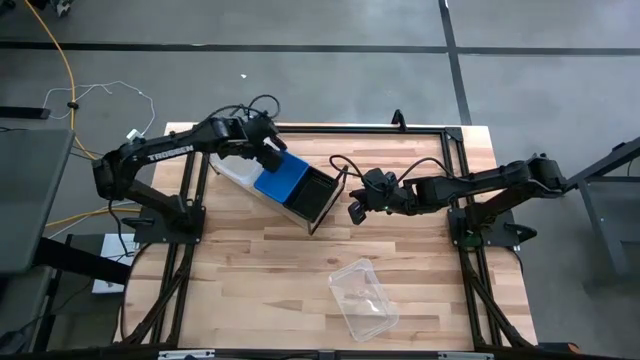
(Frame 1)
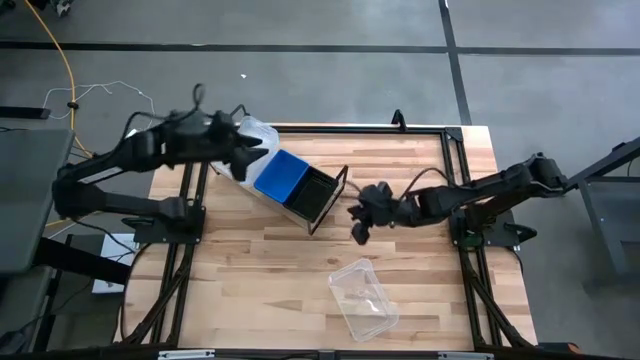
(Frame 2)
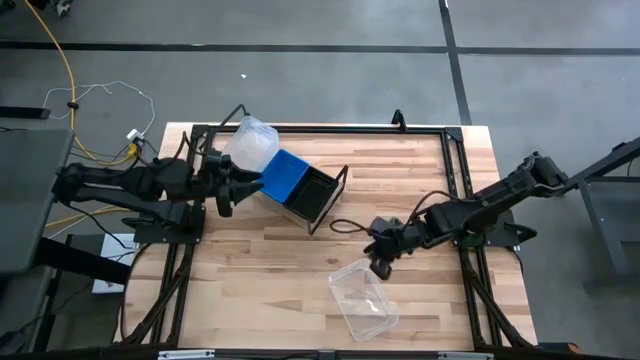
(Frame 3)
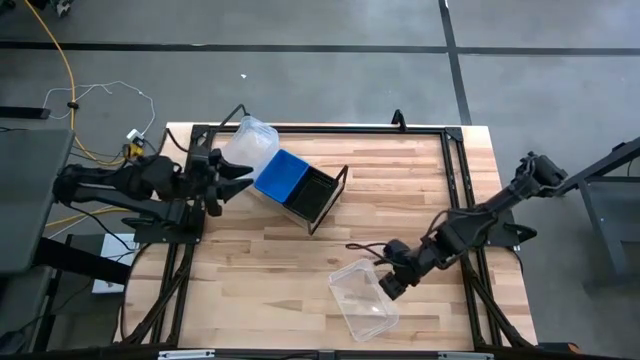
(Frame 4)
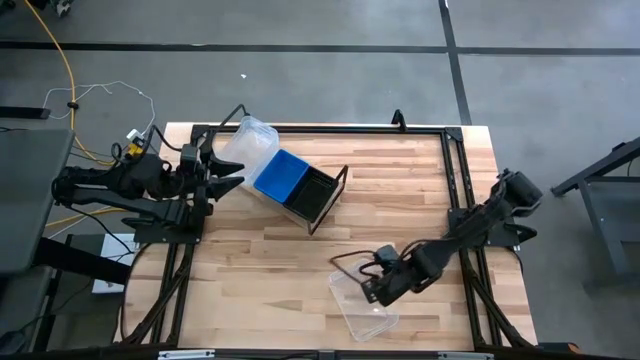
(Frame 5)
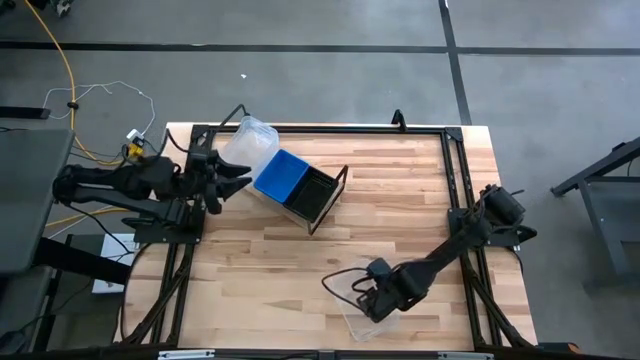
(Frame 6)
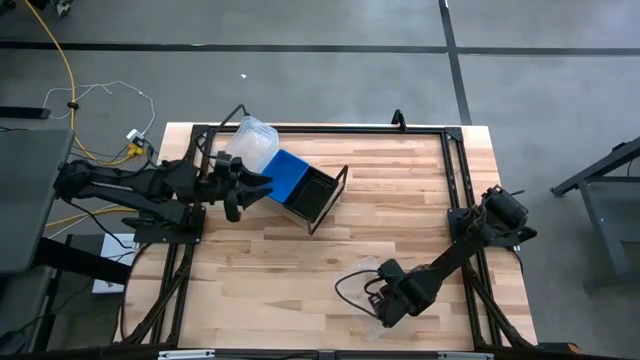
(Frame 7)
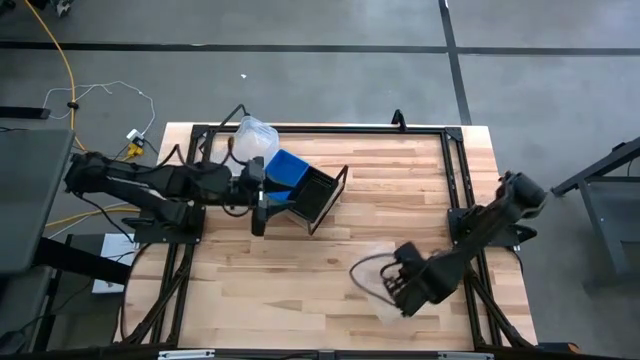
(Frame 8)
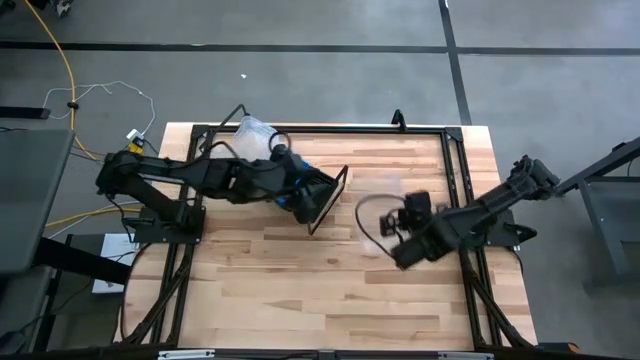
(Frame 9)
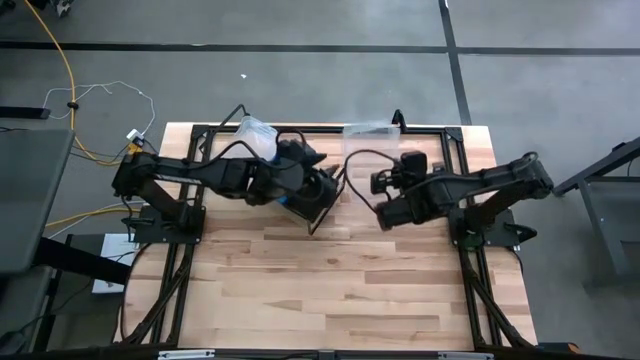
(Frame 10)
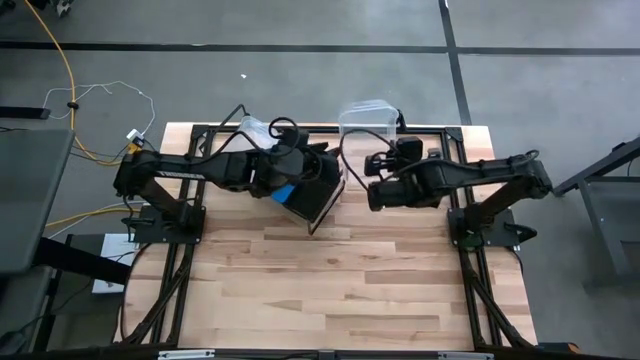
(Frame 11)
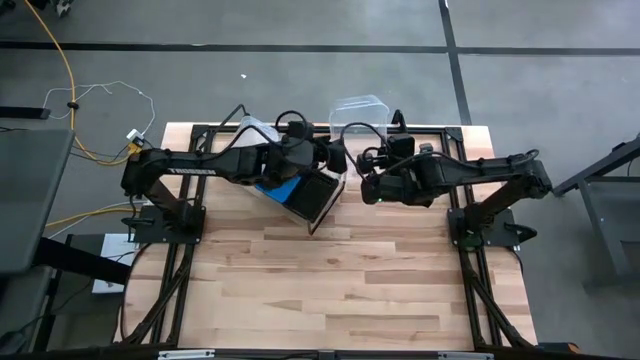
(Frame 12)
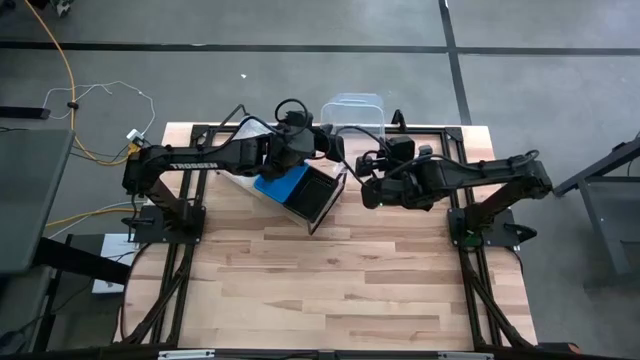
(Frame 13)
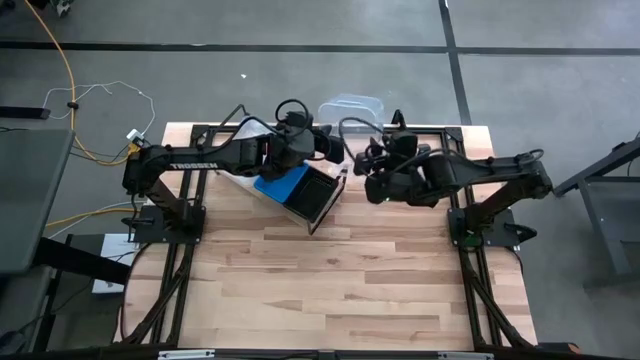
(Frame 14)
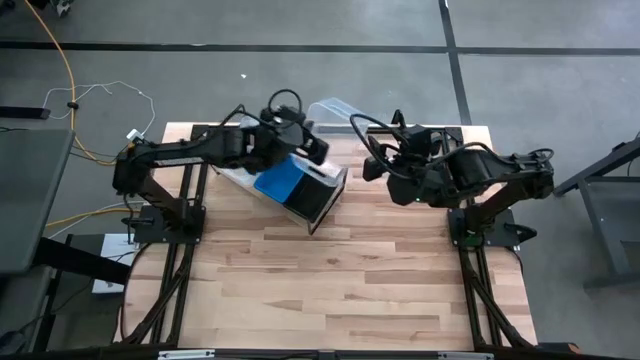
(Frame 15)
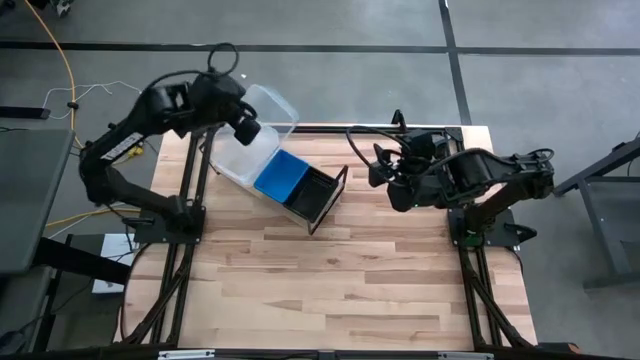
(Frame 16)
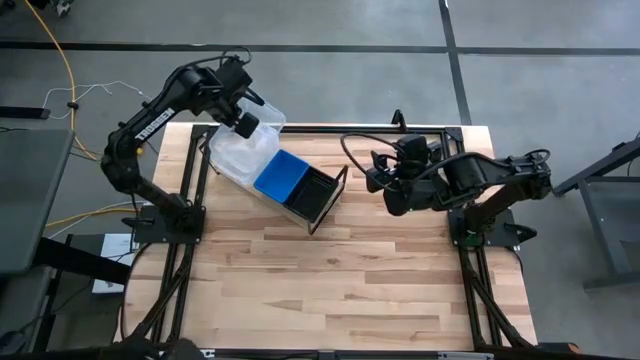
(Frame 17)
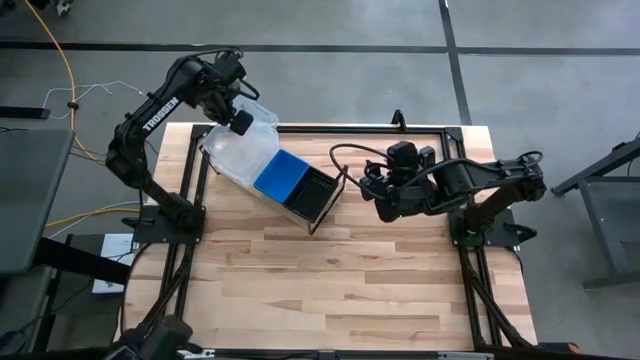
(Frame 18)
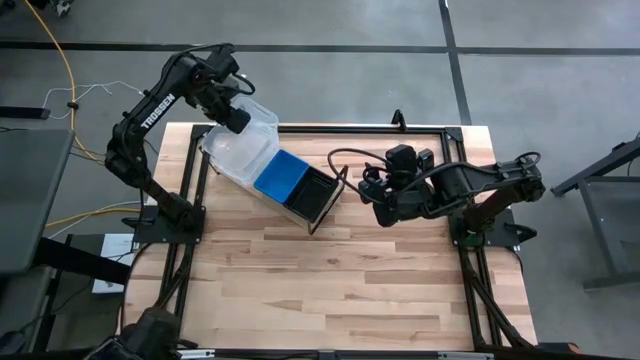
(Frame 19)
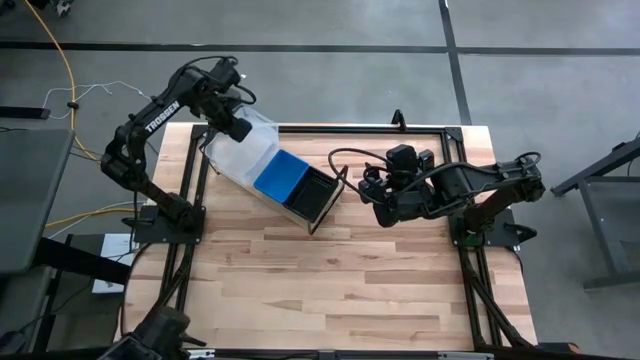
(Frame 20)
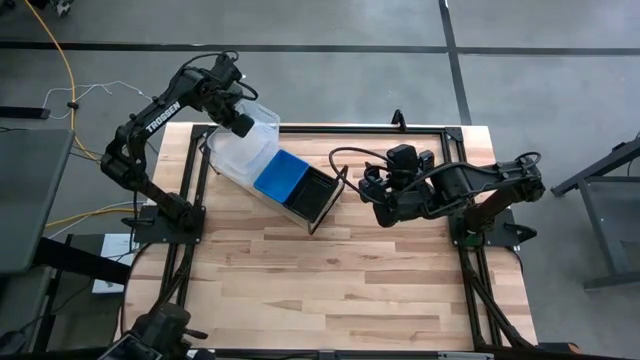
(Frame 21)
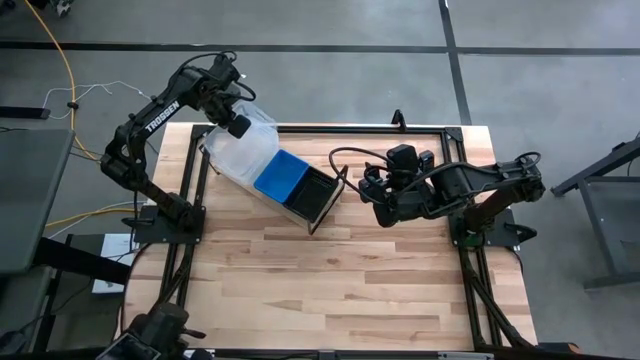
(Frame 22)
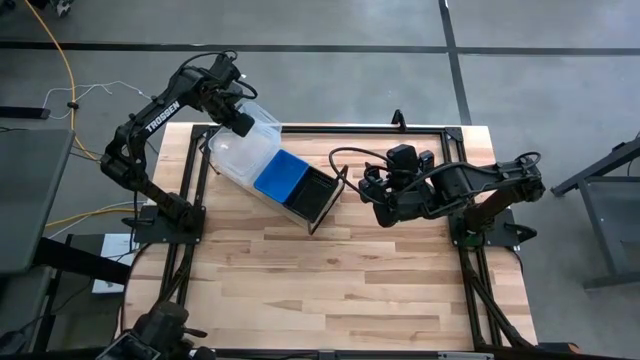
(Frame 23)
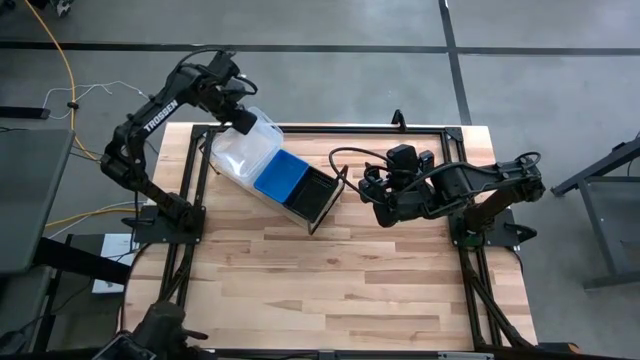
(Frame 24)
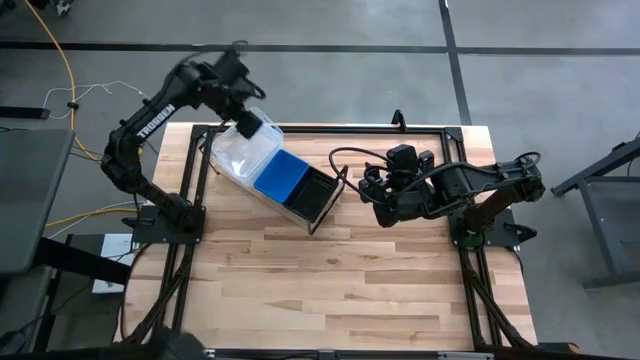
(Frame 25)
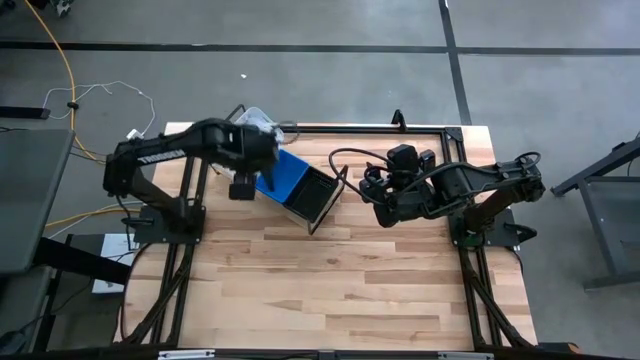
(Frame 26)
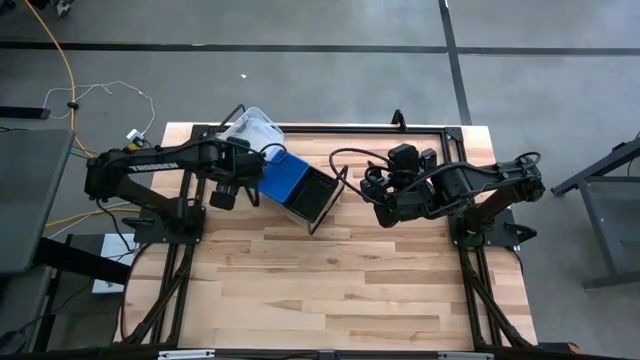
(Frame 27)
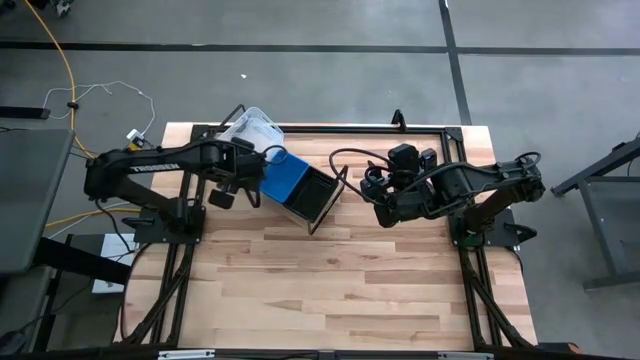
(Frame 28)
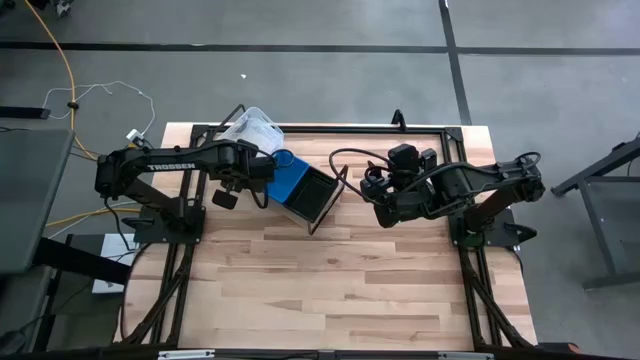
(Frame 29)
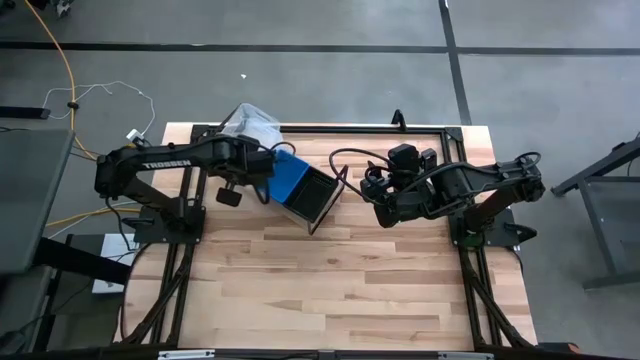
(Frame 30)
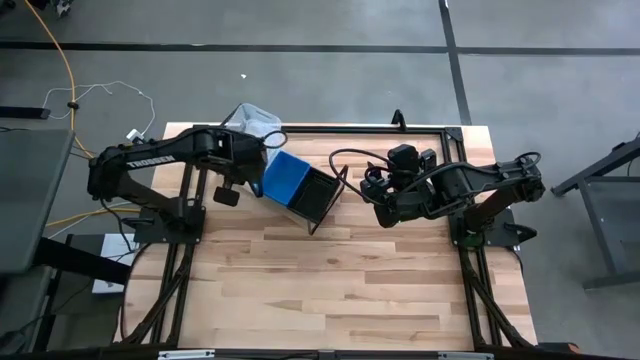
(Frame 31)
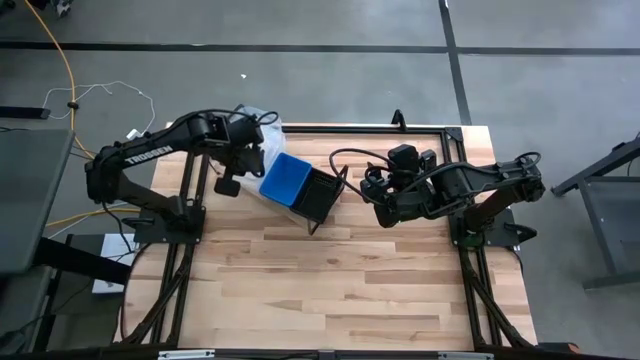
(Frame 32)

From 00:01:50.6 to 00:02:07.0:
Task: Stack baskets on shelf by color
Stack the transparent bin on top of the other transparent bins on the shelf

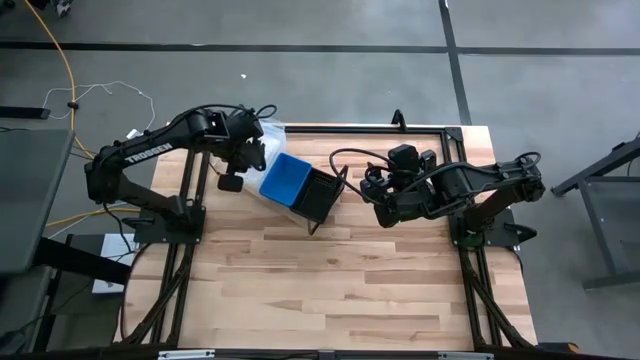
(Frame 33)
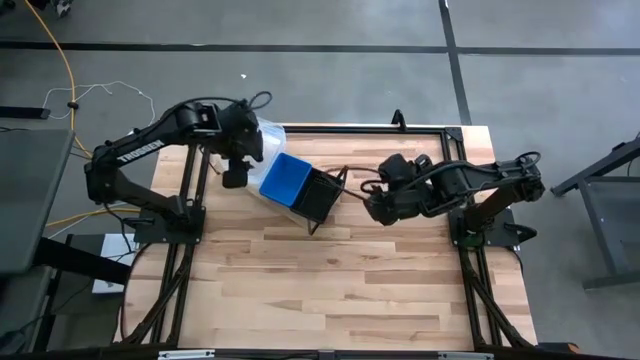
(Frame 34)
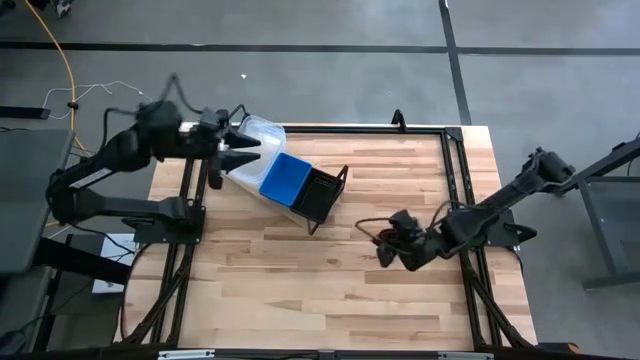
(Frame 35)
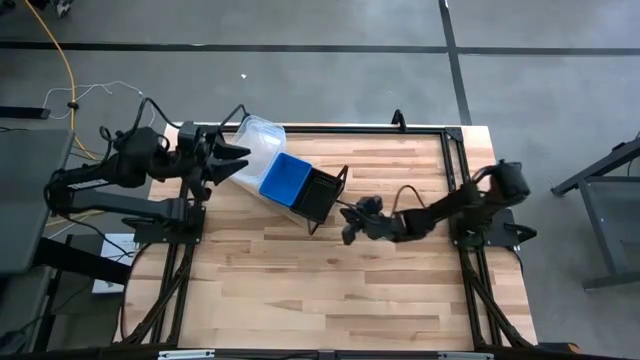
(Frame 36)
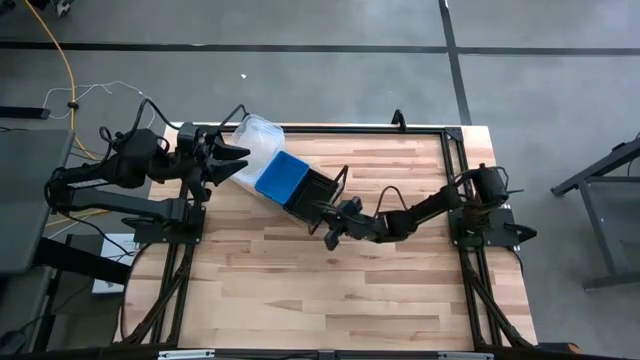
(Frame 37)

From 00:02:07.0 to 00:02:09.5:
Adjust the bins on the shelf

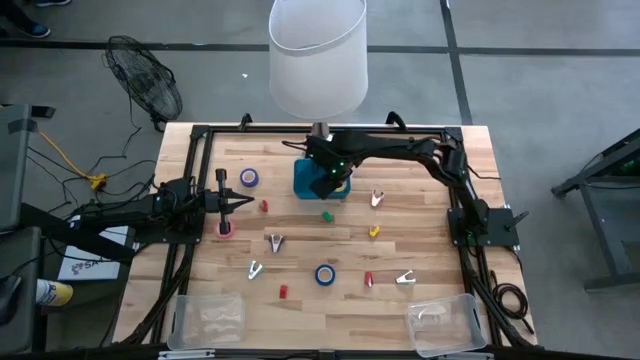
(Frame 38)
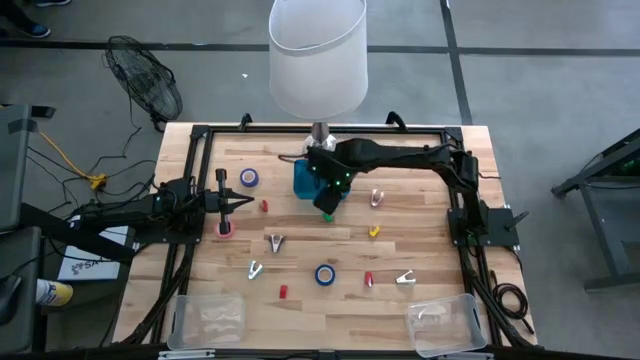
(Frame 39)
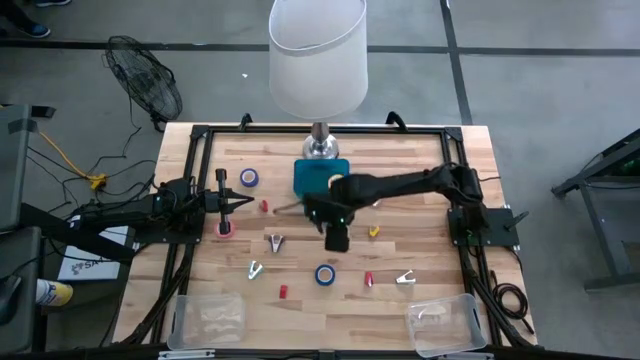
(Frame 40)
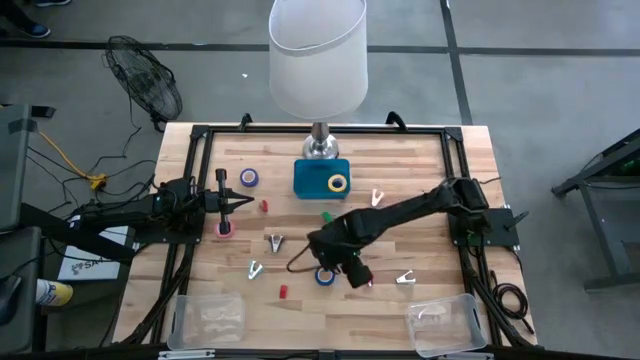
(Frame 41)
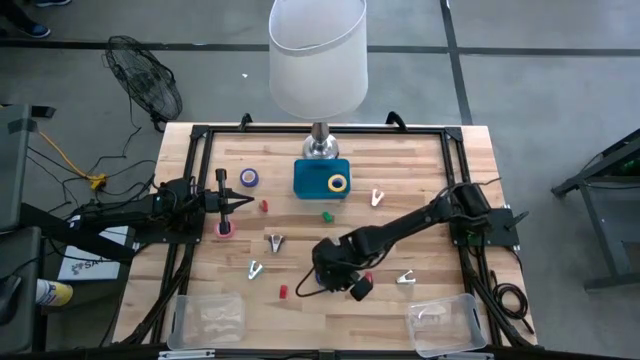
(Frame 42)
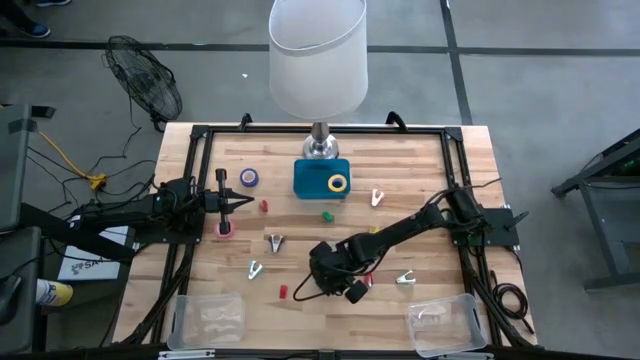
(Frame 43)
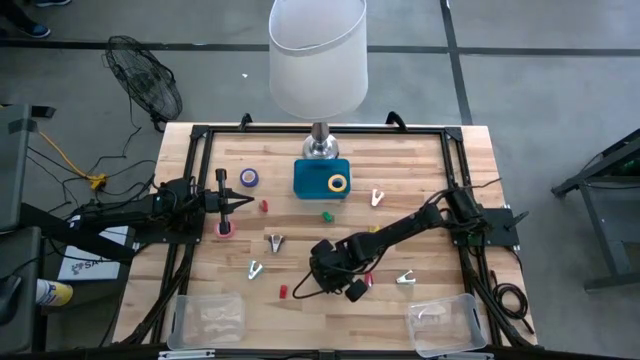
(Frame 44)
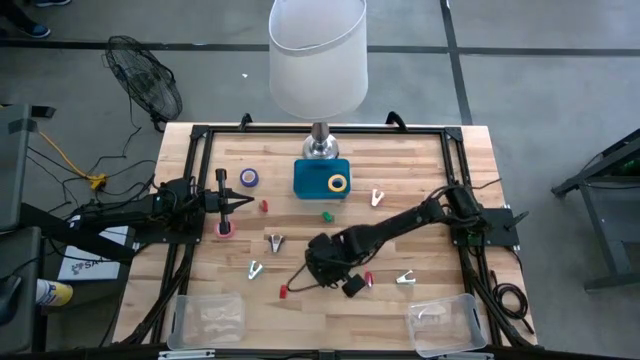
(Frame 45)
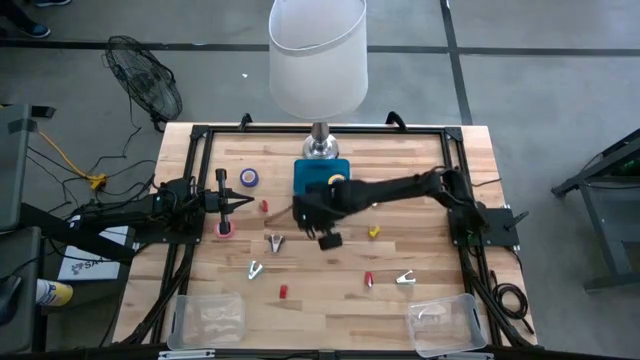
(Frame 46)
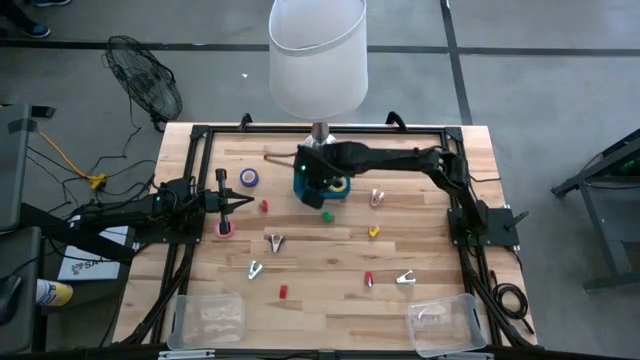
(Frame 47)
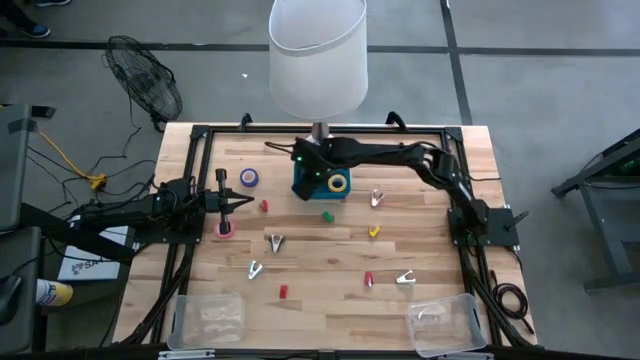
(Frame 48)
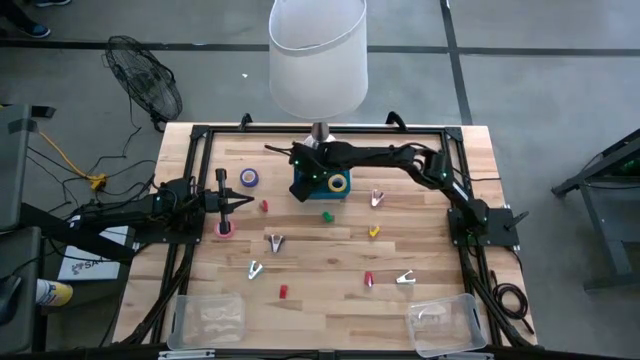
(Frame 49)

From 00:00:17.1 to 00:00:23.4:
Task: Pick and place Stapler, Stapler remover, tape
Put the bottom blue tape into the blue bin
